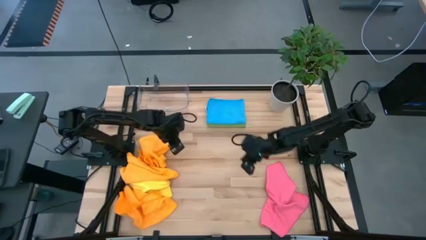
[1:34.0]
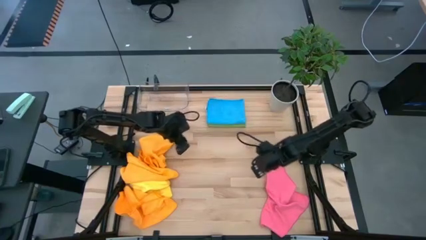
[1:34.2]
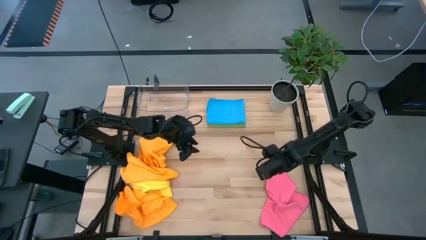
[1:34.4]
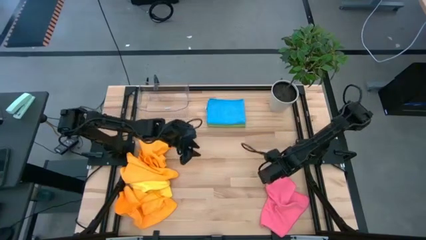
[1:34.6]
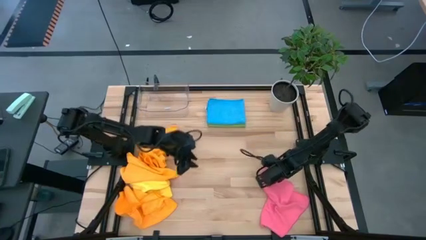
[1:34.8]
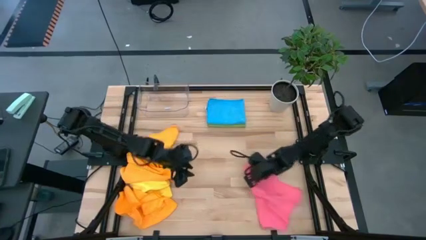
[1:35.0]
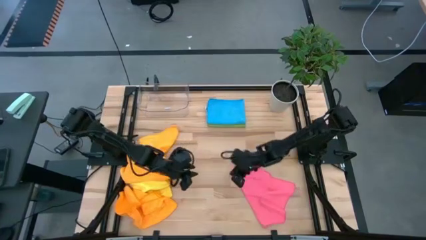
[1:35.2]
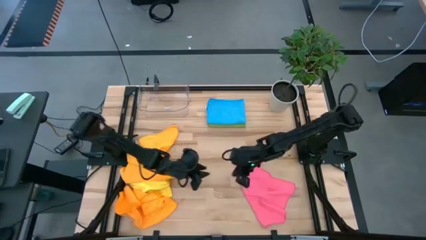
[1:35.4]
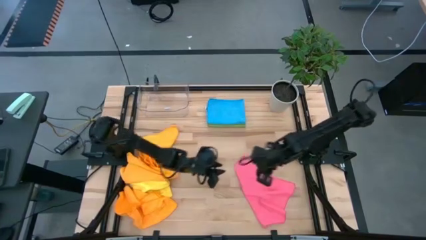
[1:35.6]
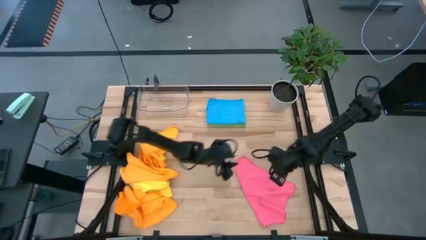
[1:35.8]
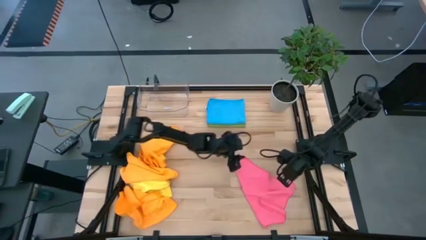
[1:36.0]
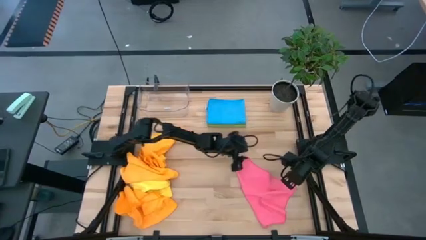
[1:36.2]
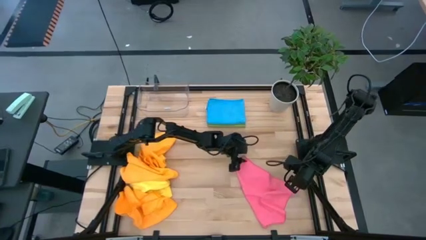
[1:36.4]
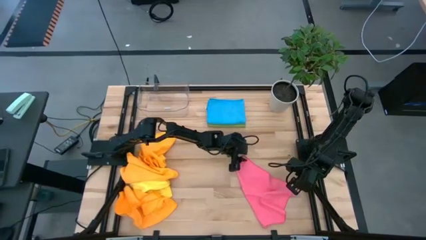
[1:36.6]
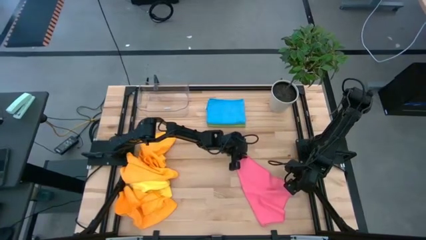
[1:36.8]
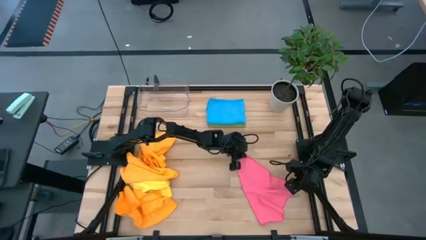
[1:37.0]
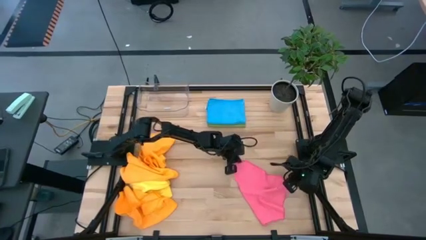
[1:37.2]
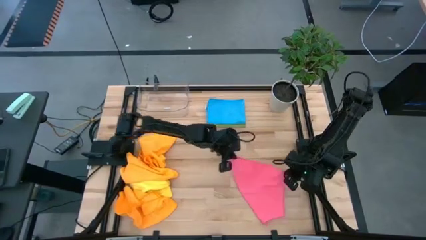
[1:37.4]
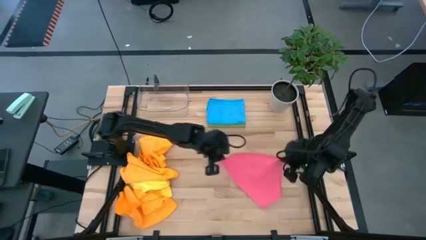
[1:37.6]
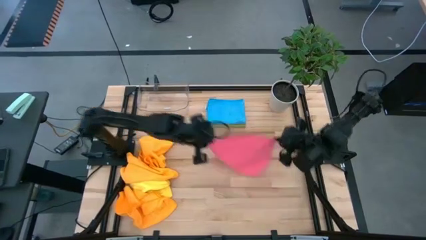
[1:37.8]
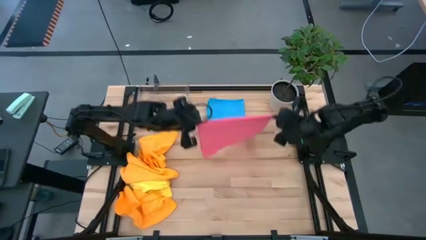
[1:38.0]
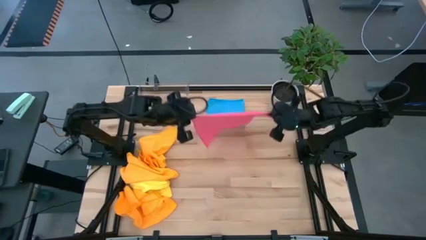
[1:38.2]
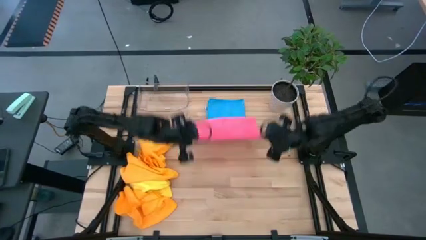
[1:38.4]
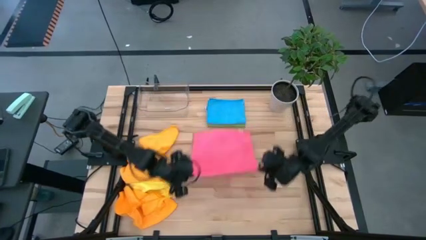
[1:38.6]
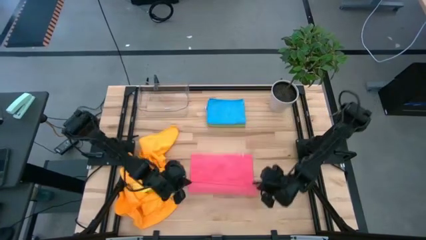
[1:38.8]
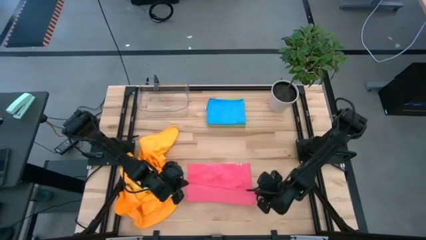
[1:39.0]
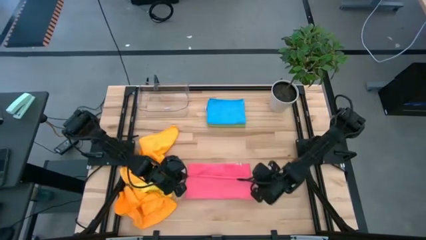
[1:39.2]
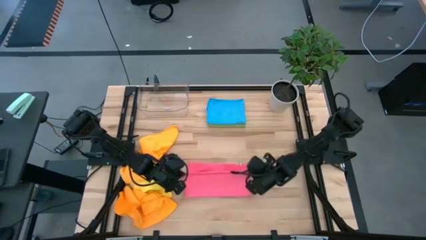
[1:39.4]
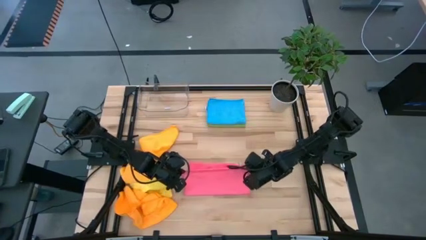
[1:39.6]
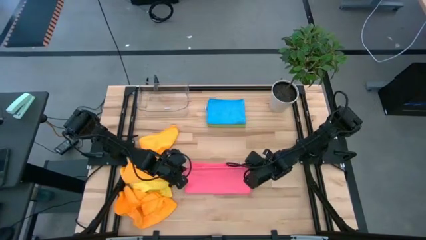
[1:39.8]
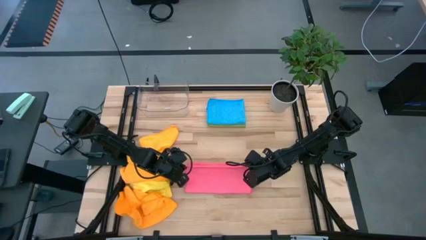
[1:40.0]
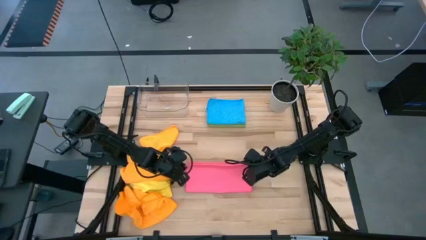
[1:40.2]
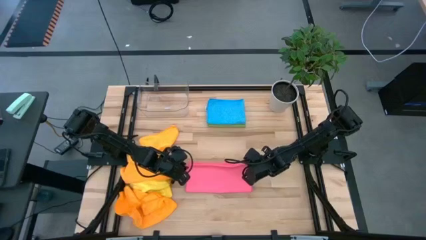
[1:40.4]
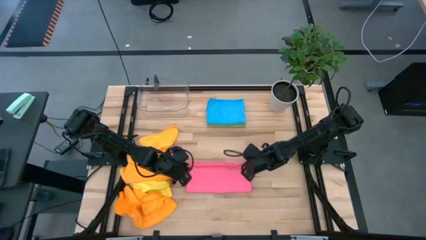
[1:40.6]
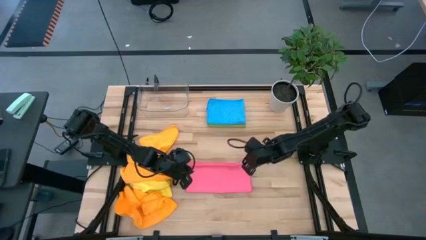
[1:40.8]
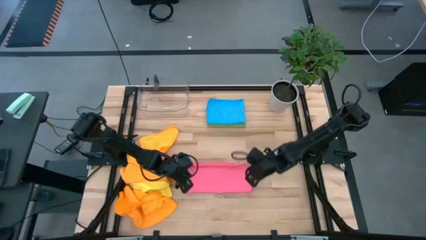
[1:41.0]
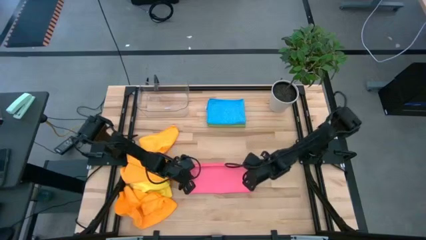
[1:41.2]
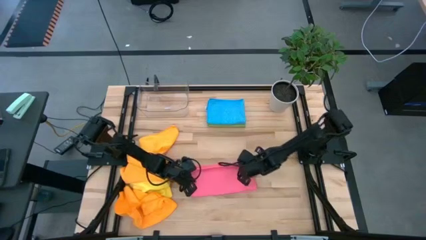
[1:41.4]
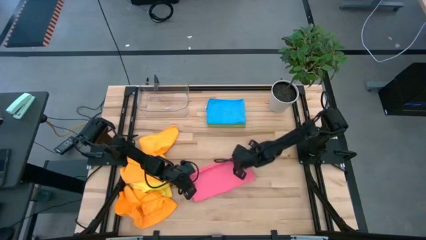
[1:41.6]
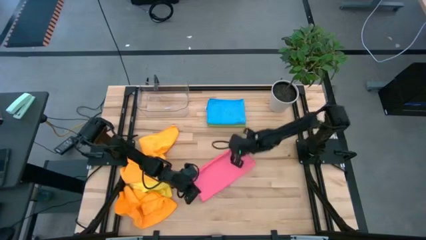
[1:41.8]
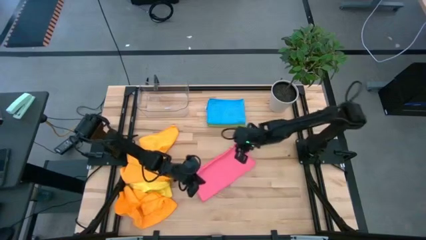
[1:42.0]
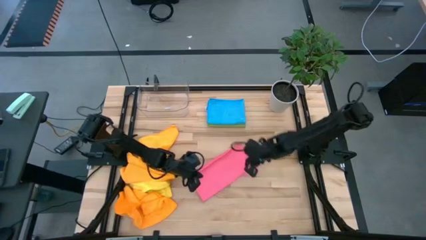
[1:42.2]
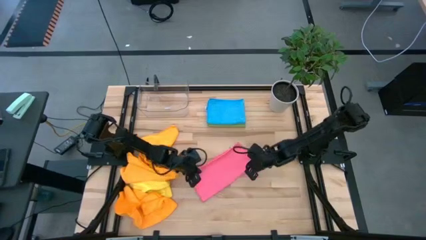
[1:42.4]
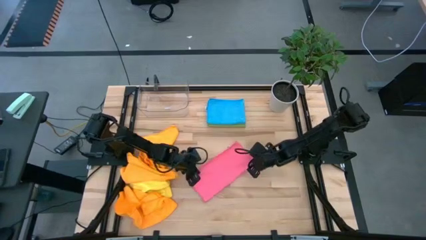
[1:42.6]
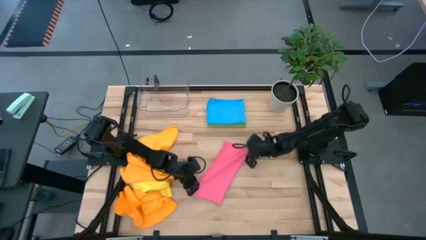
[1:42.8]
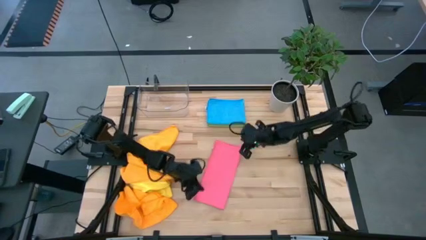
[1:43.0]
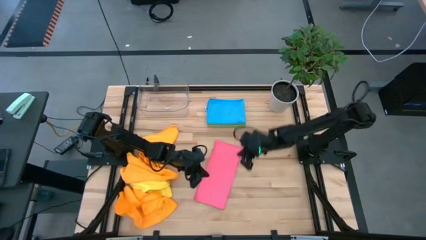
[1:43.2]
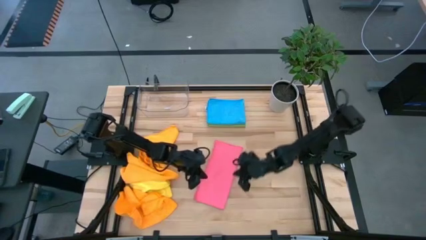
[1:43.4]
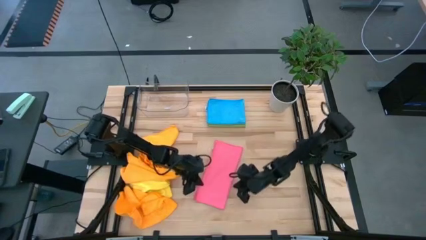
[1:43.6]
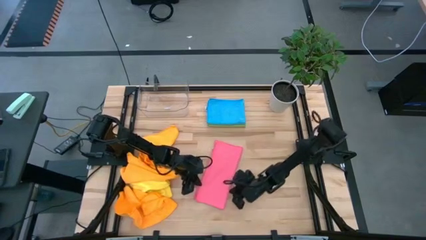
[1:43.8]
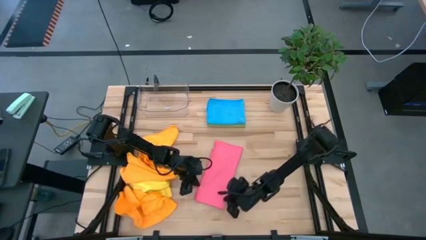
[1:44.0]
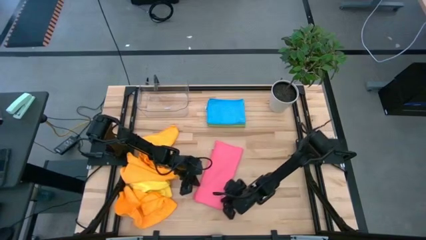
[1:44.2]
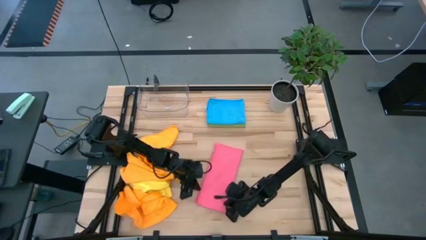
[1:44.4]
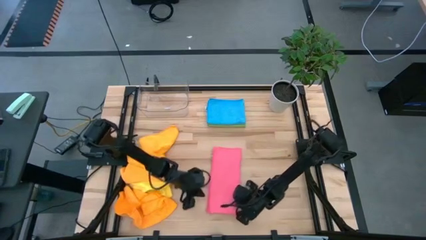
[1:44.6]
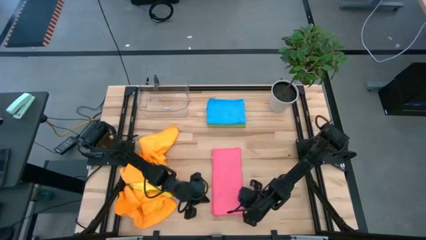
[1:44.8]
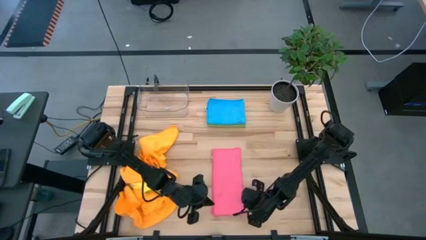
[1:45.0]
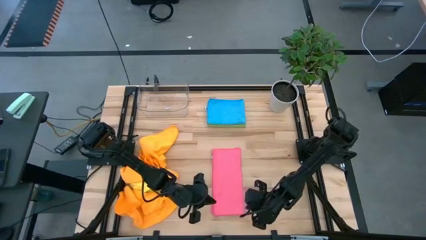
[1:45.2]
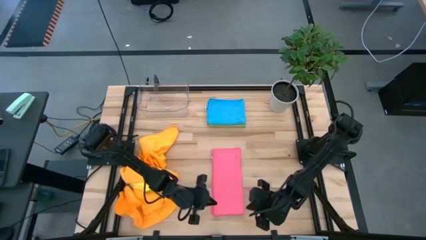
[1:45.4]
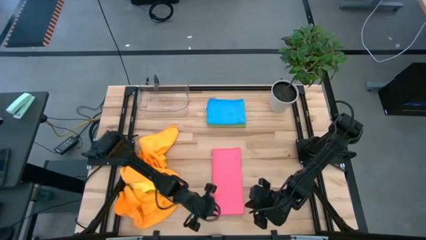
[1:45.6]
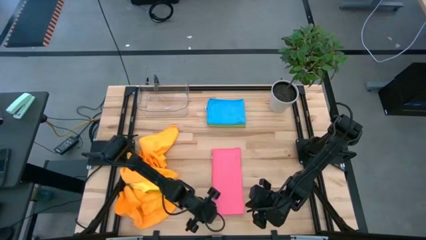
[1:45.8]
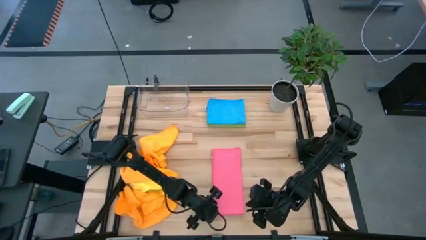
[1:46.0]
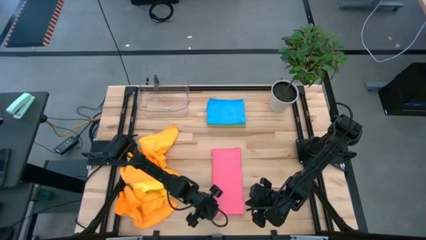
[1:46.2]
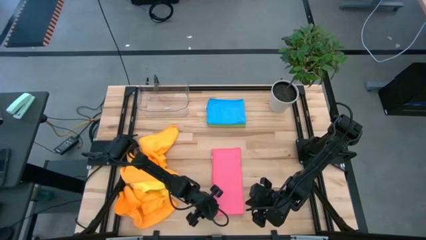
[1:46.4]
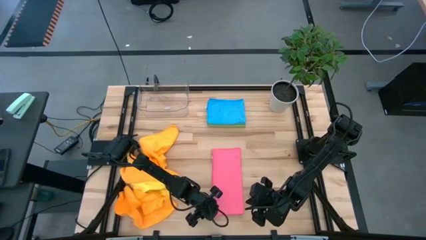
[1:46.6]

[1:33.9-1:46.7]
Task: Fold microfiber towels
Fold the pink towel

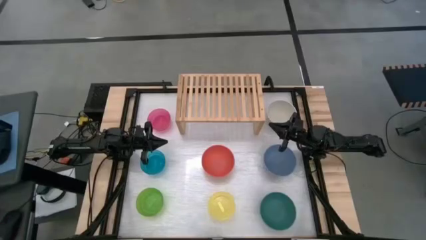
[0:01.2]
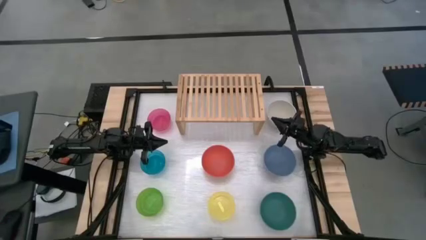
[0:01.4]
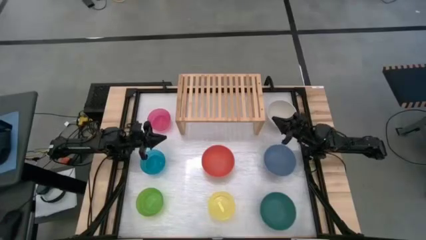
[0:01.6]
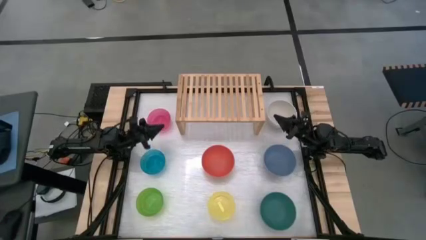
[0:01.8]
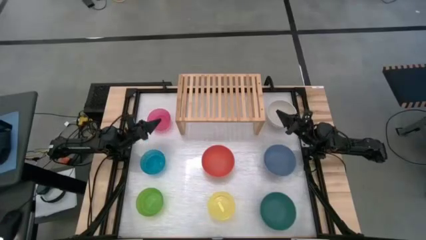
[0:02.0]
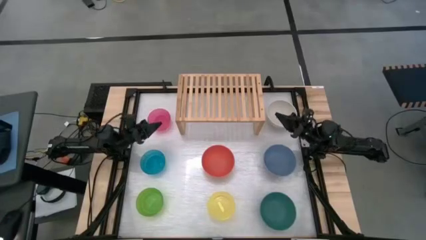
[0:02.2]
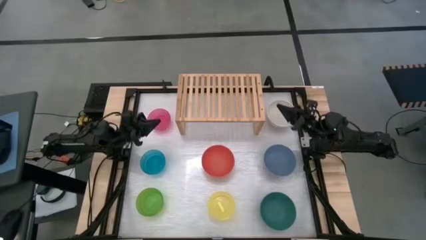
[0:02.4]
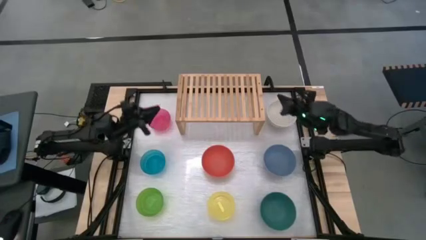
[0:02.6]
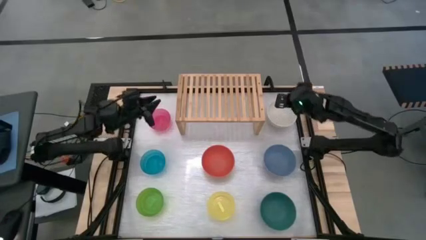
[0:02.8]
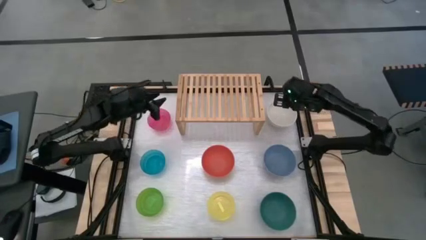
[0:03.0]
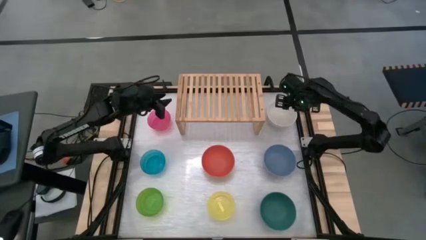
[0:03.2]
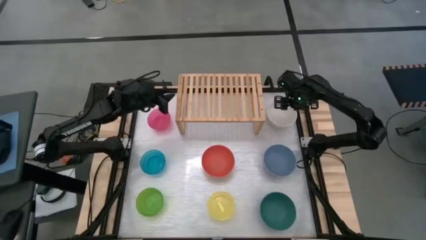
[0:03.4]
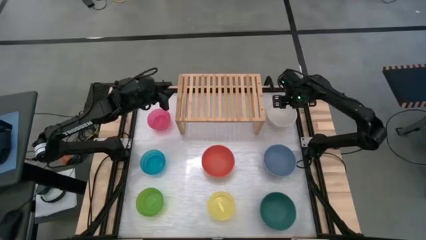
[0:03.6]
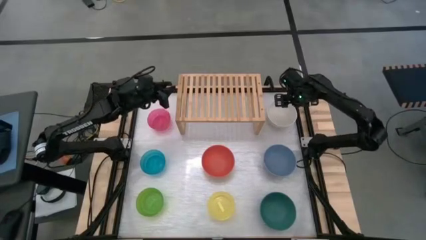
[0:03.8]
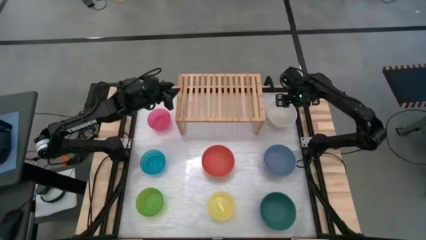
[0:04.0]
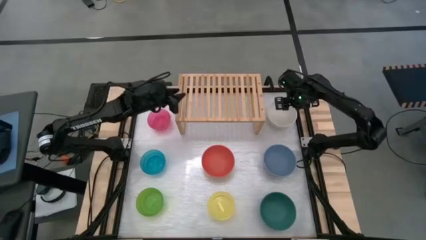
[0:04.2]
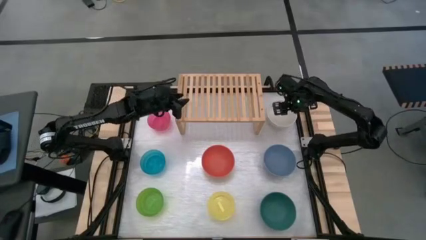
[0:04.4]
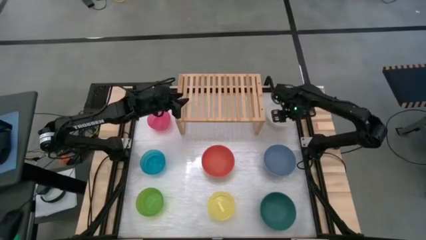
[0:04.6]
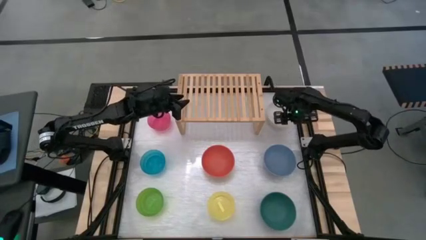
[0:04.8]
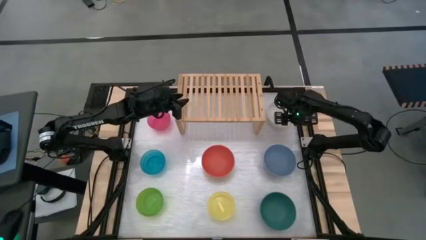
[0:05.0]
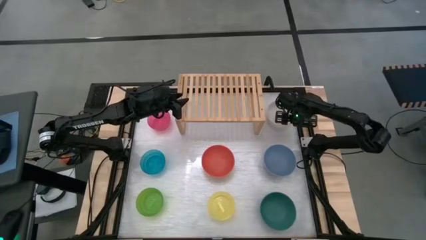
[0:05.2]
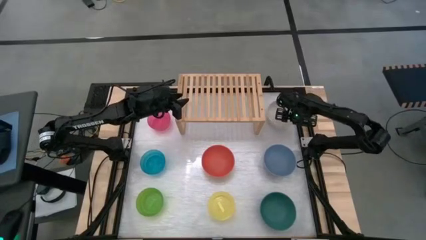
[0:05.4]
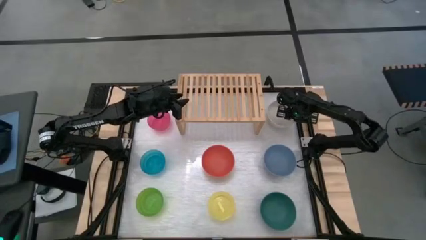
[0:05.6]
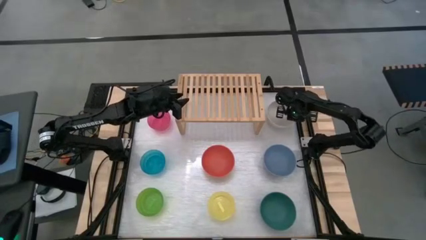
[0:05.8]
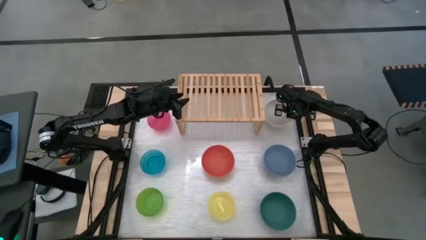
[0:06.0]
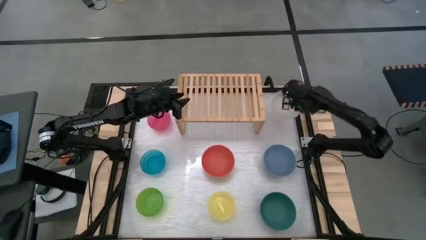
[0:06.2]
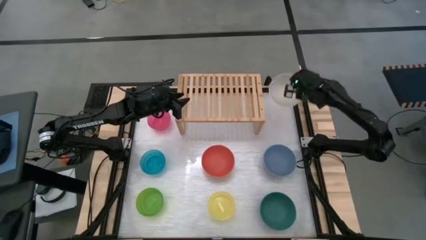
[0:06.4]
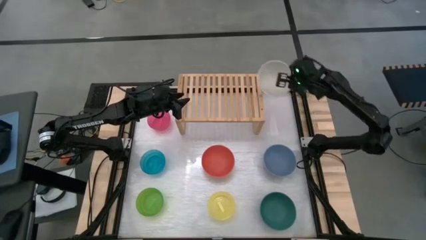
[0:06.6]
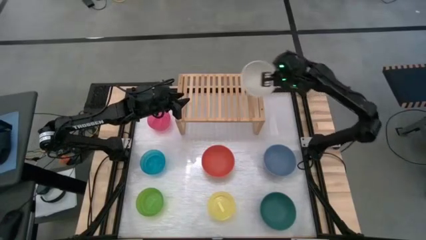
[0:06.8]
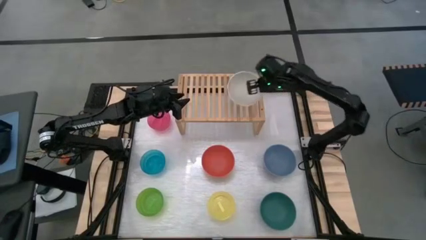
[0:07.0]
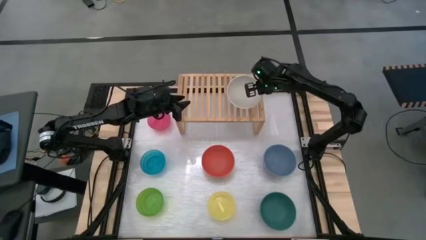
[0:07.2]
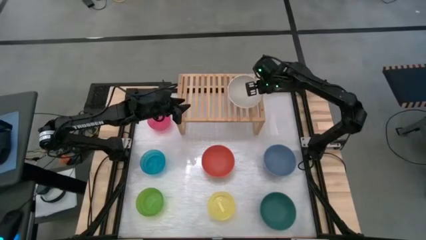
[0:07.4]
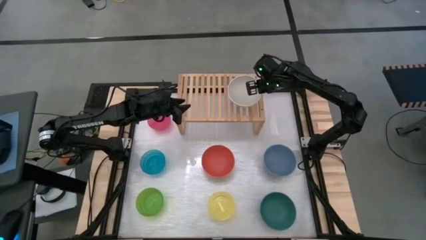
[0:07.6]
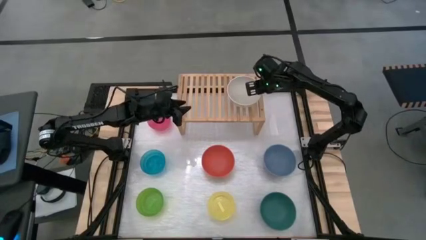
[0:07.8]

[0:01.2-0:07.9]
Task: Place and stack bowls onto a shelf
Put the large white bowl on the shelf
